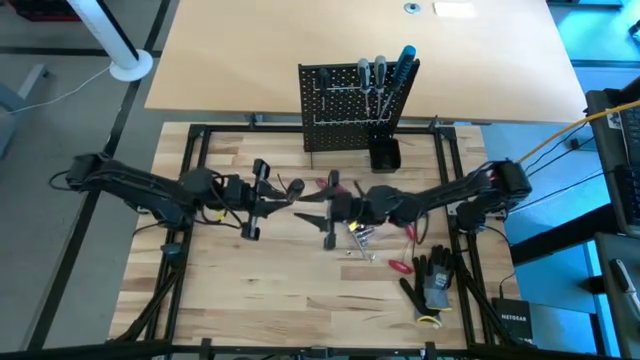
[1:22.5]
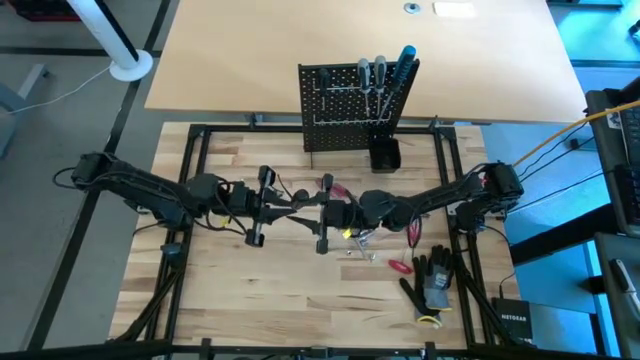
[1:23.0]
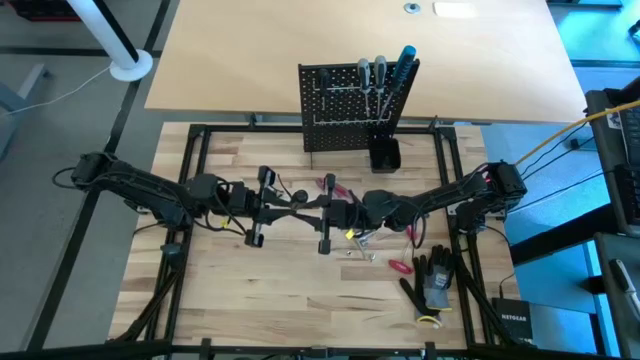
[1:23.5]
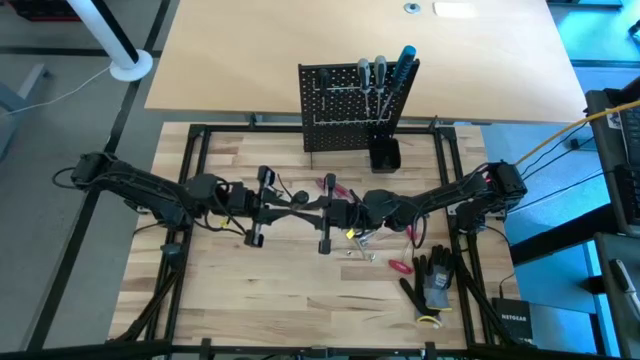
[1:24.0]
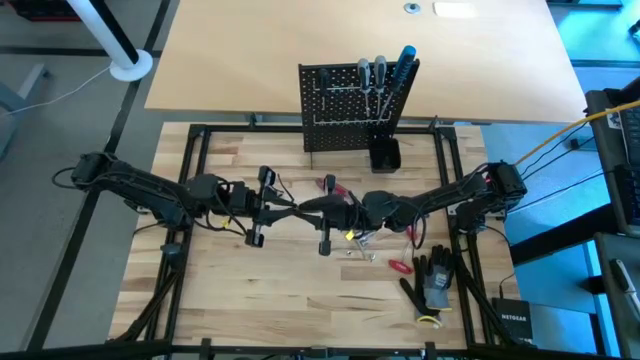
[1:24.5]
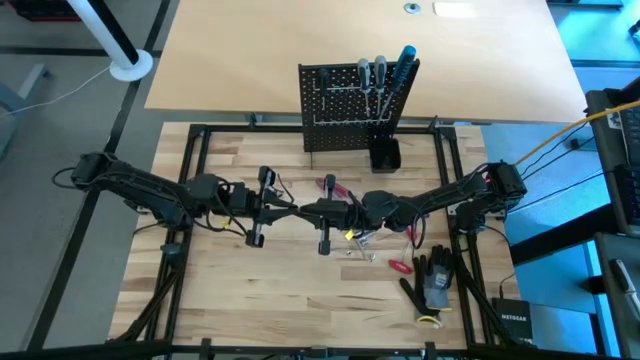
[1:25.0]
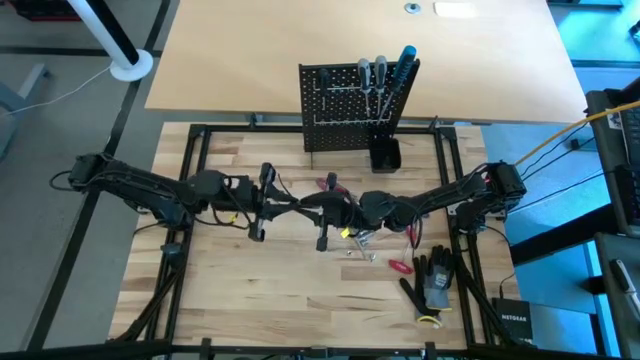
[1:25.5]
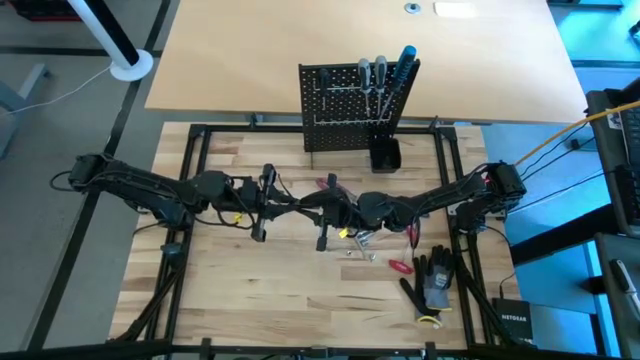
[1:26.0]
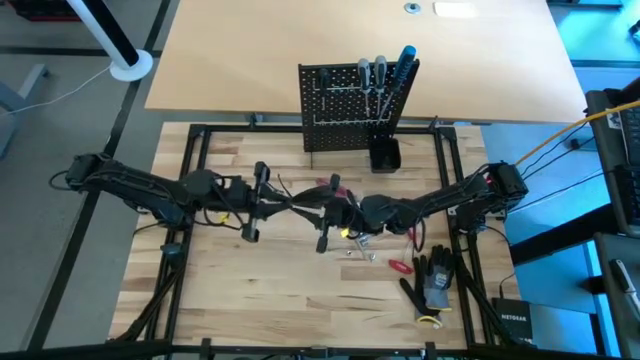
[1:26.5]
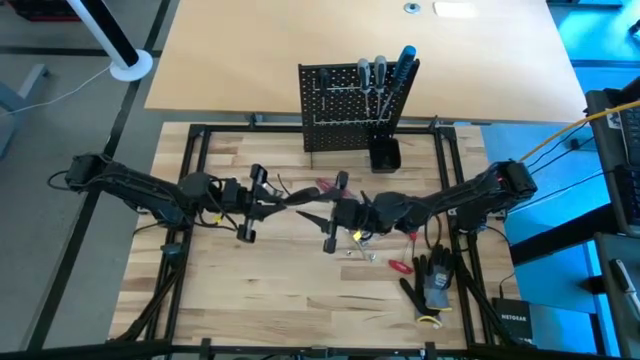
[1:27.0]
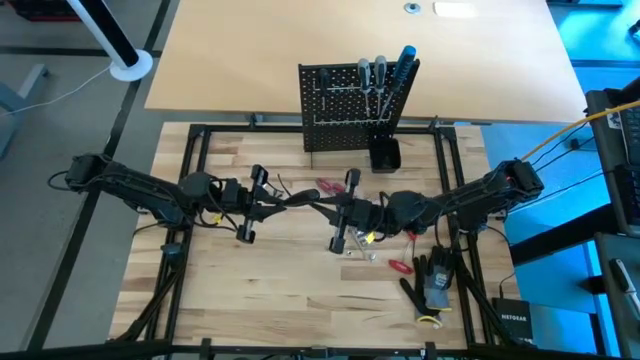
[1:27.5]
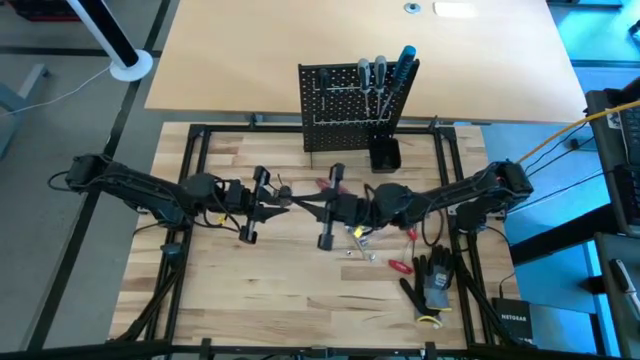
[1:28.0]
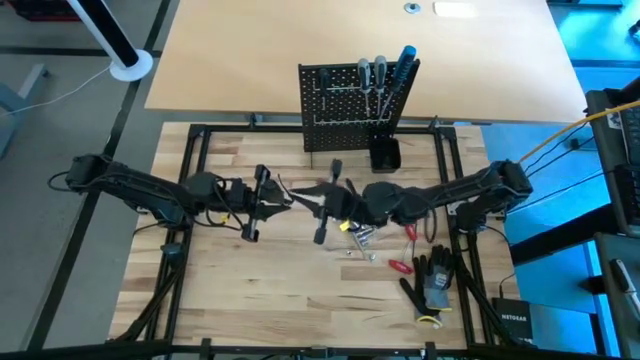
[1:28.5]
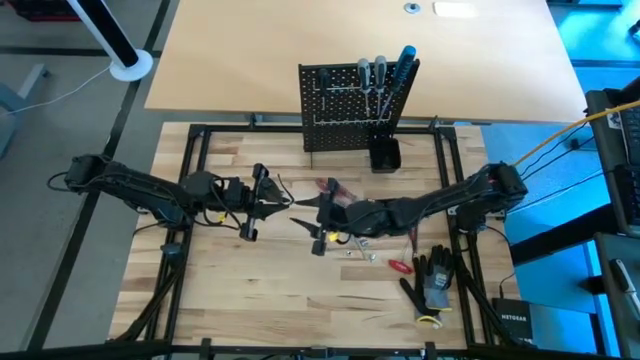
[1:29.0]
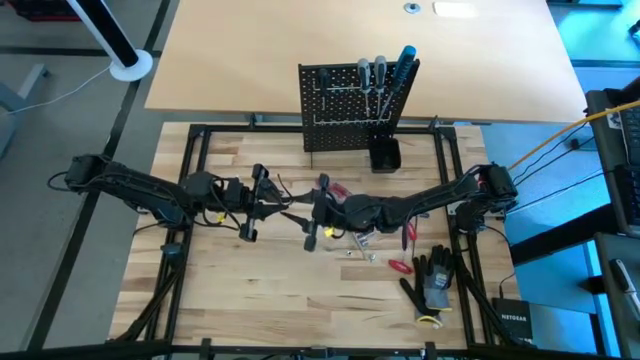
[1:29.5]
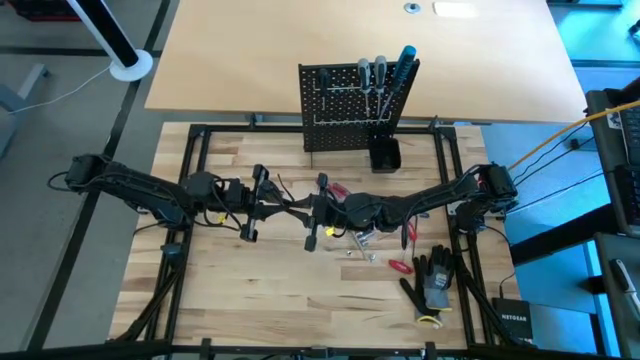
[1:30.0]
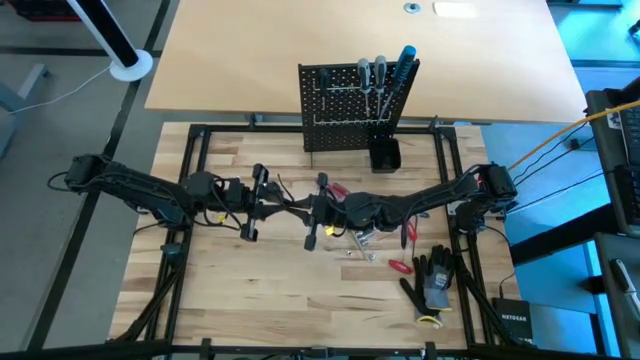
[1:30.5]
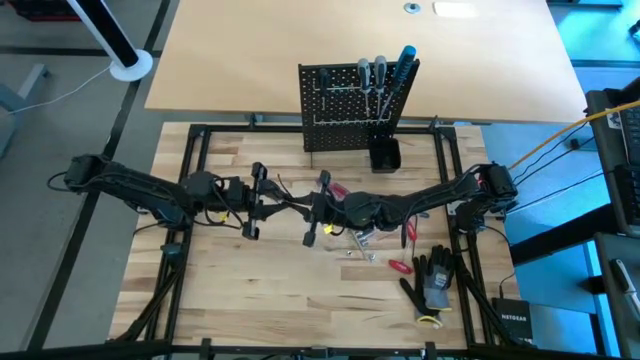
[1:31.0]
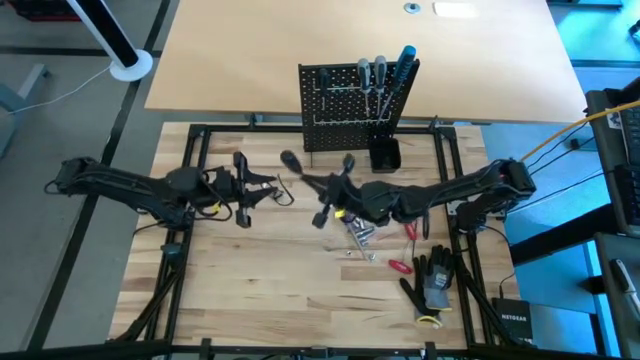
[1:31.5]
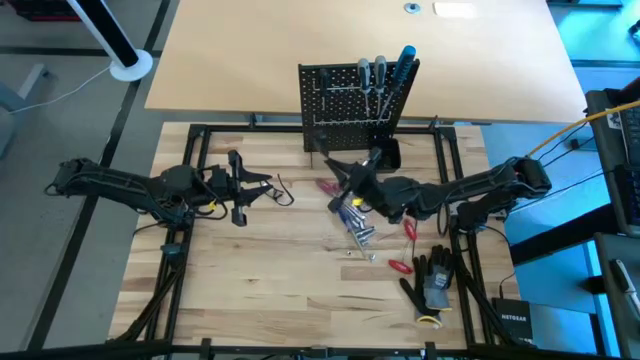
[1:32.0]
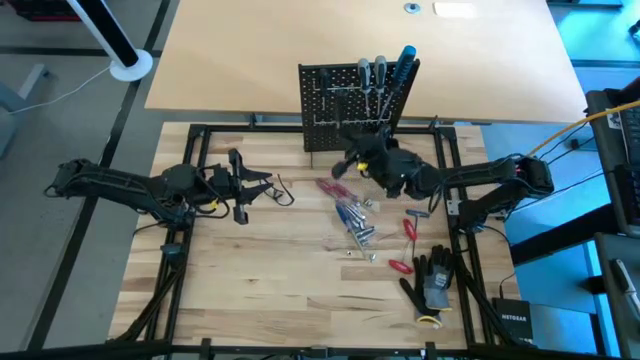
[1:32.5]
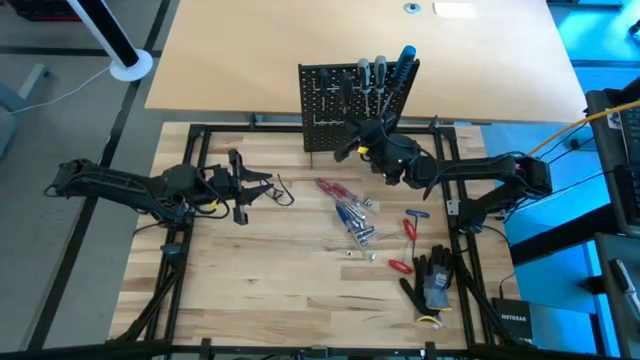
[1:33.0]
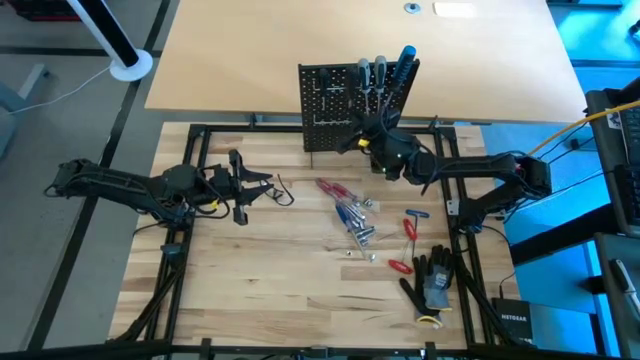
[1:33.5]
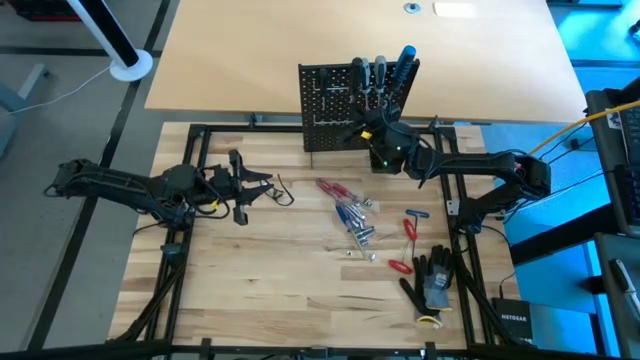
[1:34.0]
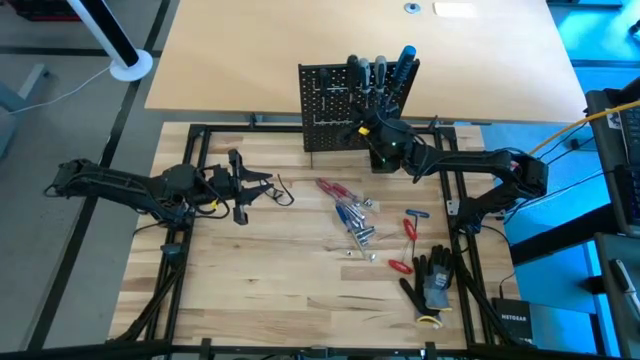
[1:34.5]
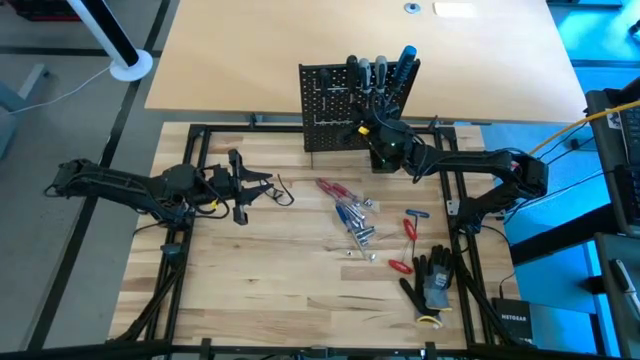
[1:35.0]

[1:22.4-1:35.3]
Task: Hang tools onto peg board
Hang the black screwdriver on the peg board

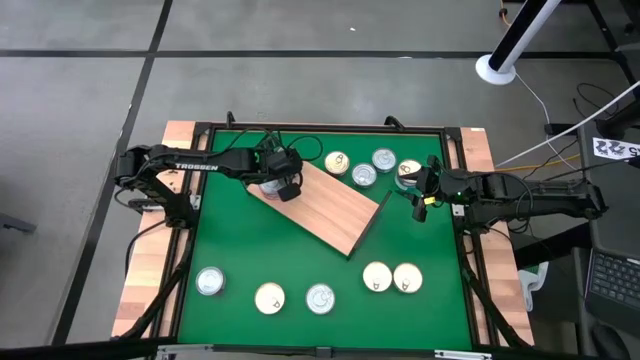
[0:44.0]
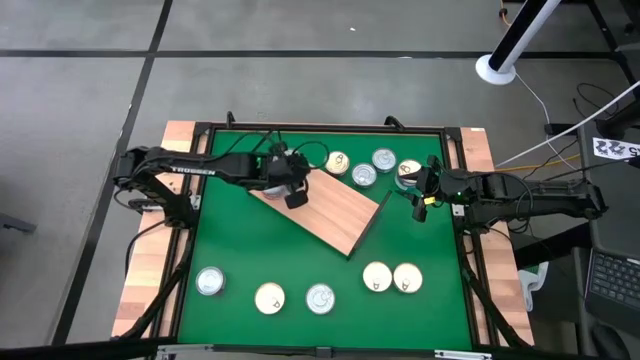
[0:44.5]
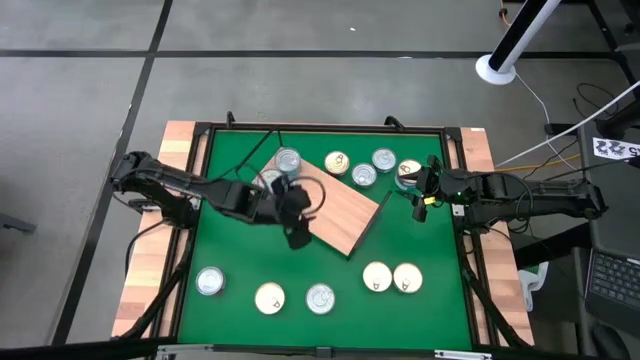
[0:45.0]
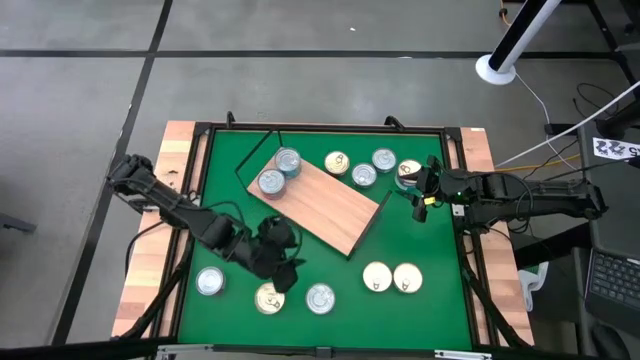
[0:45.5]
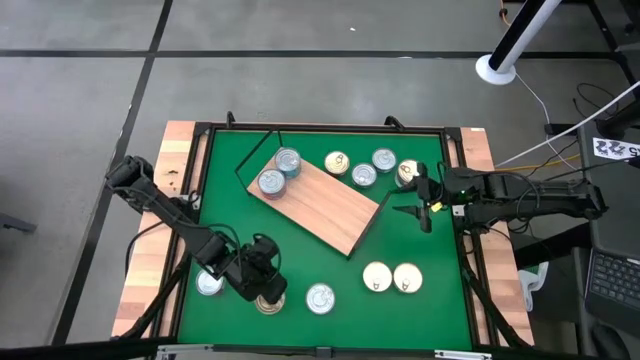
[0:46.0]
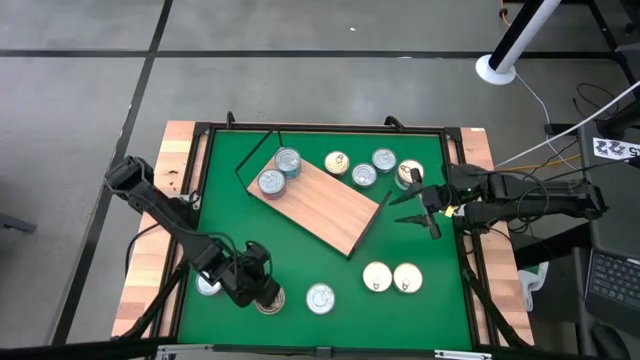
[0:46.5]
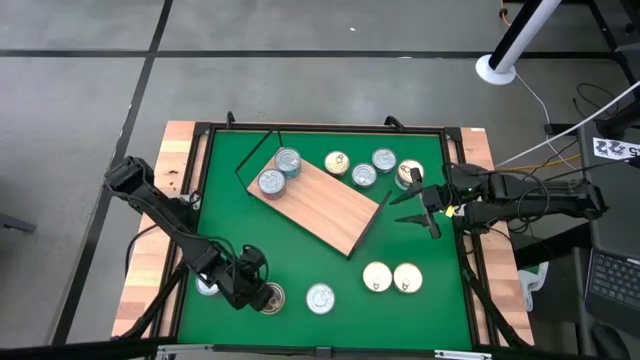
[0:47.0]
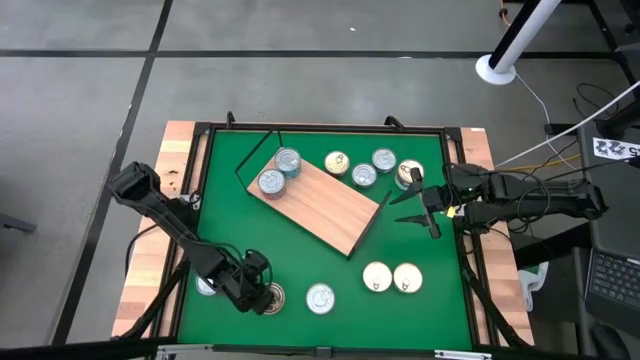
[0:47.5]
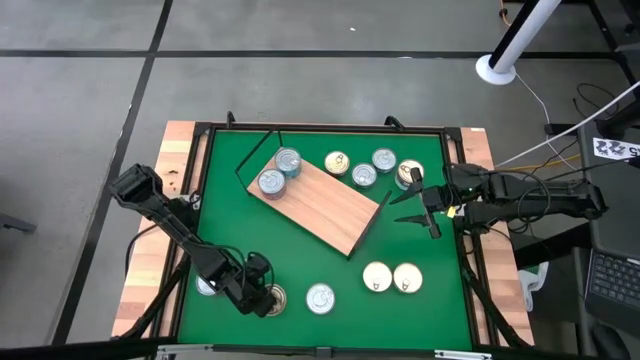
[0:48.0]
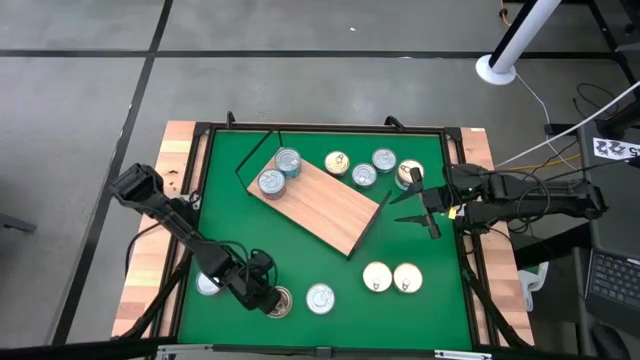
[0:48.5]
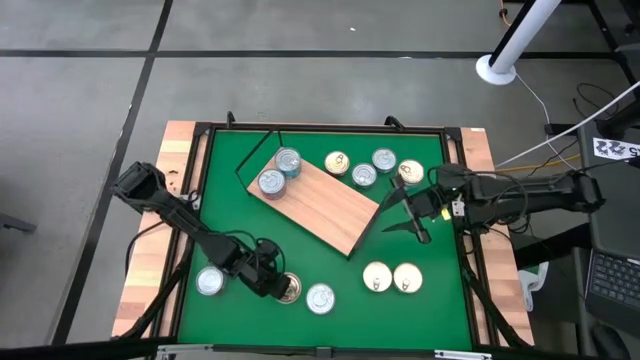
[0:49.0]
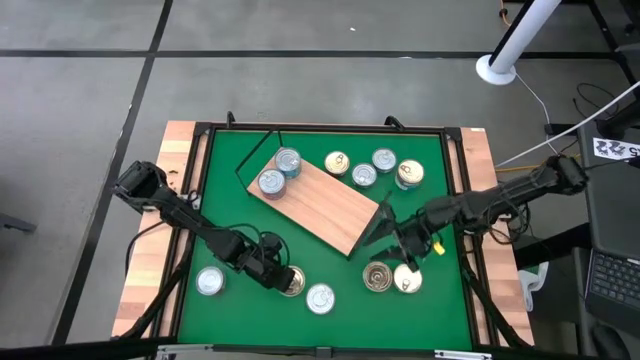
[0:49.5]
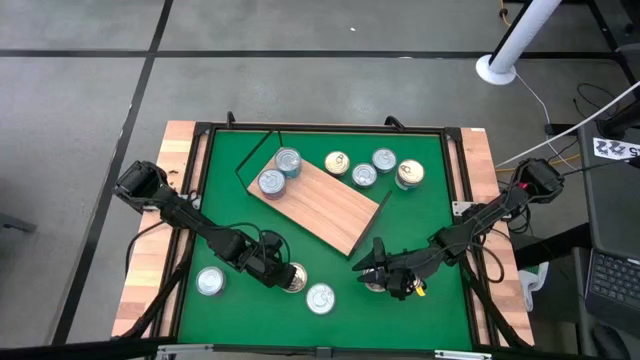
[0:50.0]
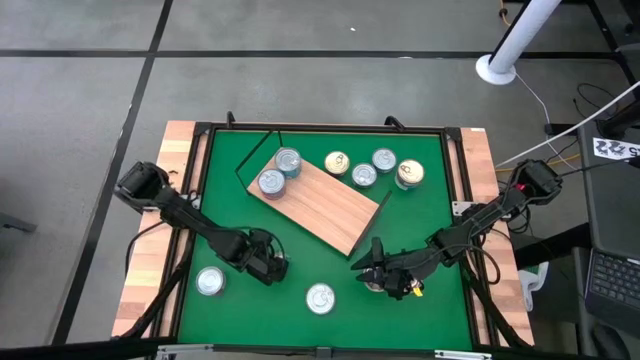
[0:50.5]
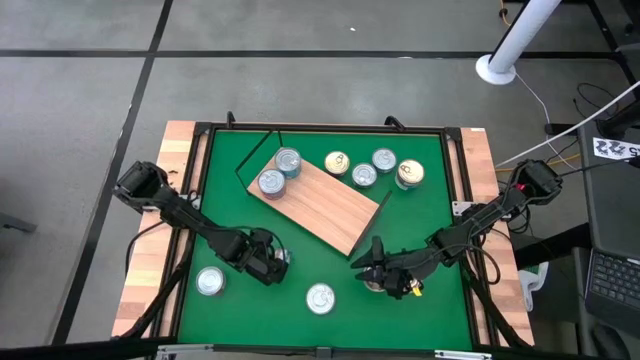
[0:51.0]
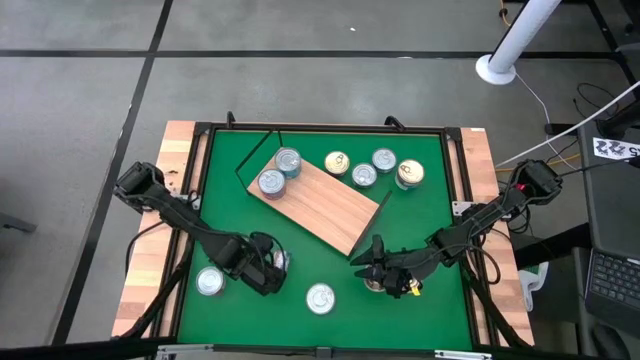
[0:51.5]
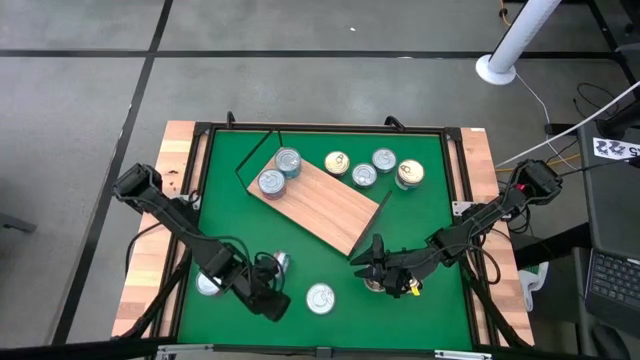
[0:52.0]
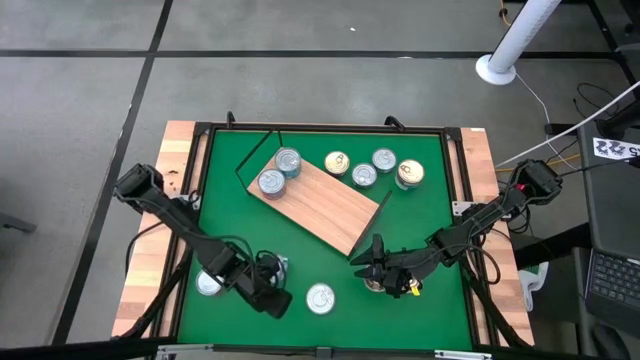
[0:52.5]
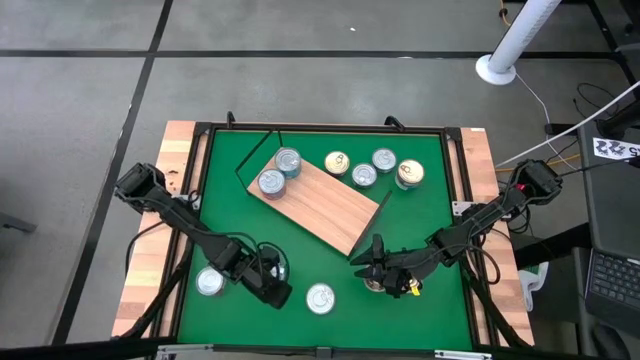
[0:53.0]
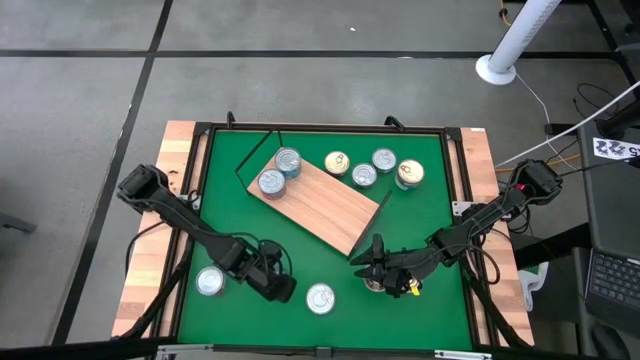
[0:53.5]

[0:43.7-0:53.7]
Task: Stack canned seafood by type on shelf
Put the blue and pink tuna can on the shelf
